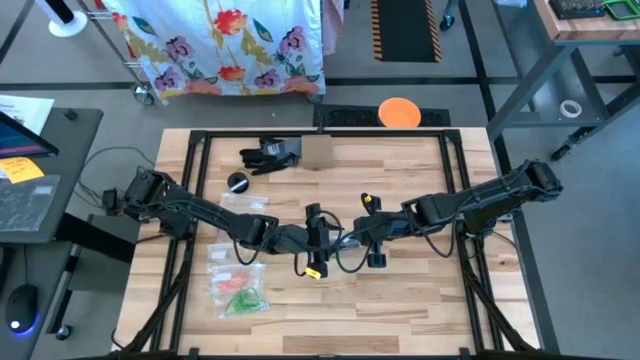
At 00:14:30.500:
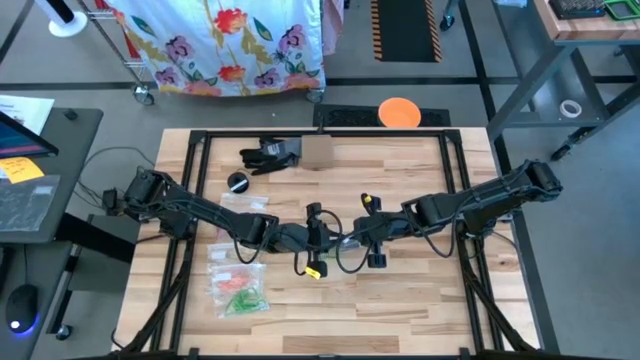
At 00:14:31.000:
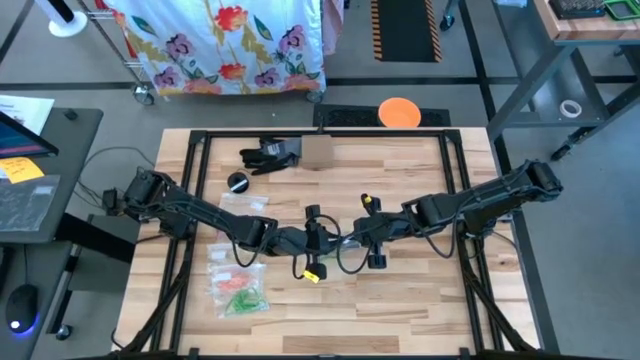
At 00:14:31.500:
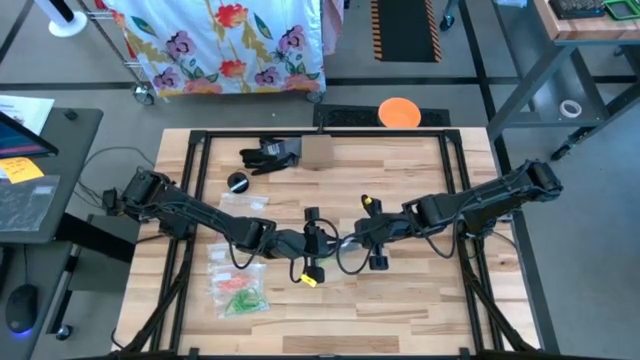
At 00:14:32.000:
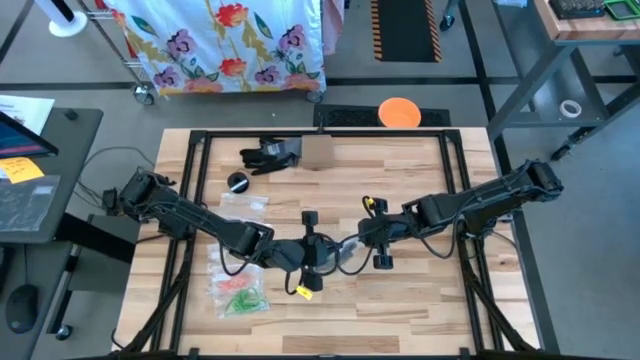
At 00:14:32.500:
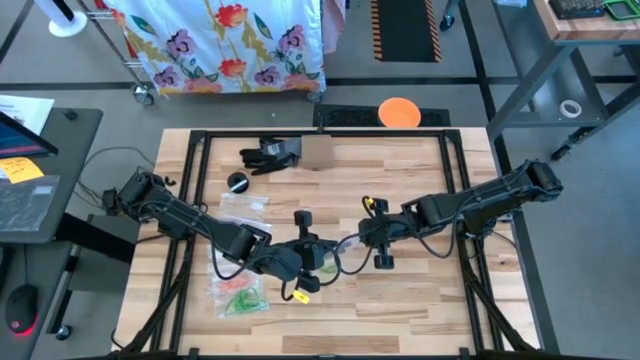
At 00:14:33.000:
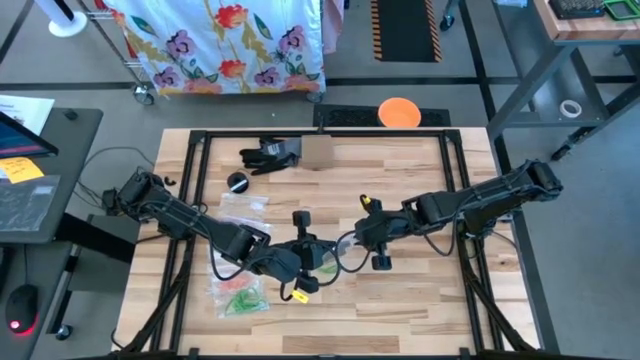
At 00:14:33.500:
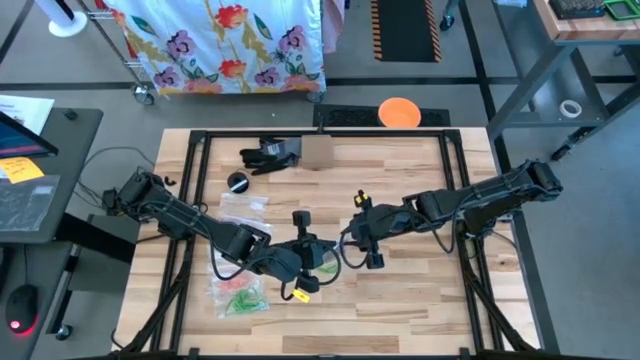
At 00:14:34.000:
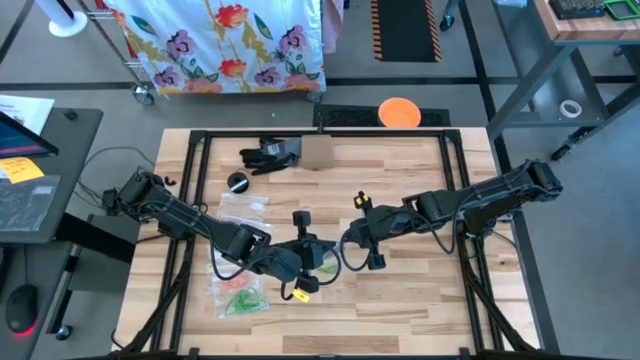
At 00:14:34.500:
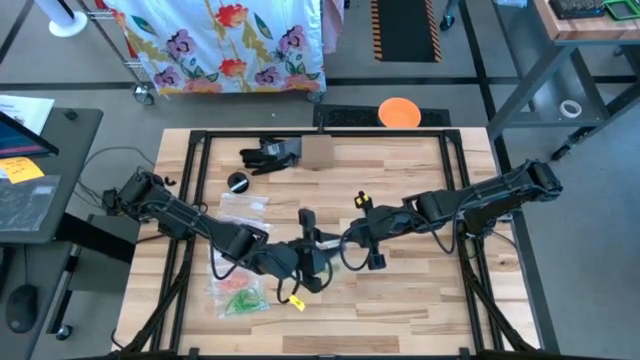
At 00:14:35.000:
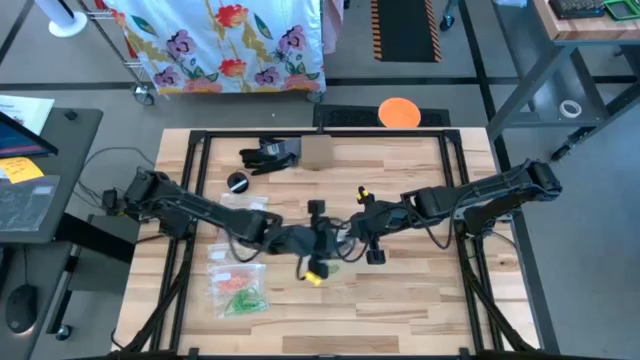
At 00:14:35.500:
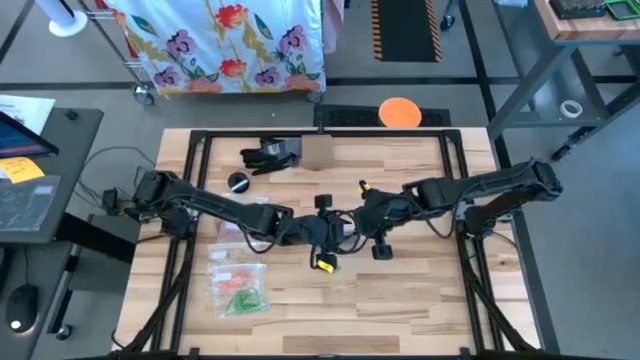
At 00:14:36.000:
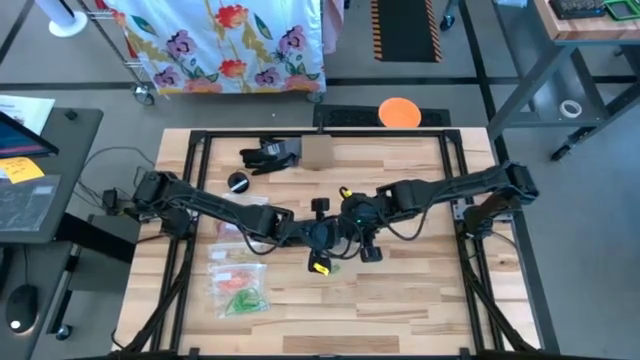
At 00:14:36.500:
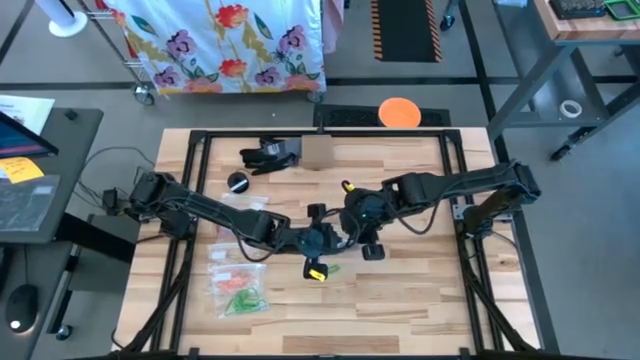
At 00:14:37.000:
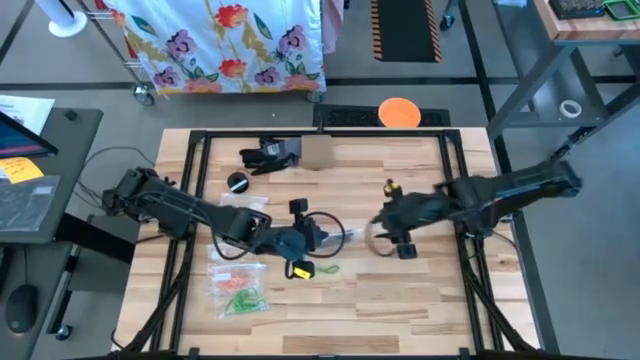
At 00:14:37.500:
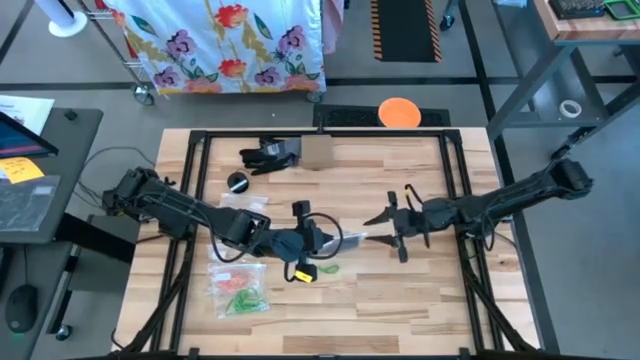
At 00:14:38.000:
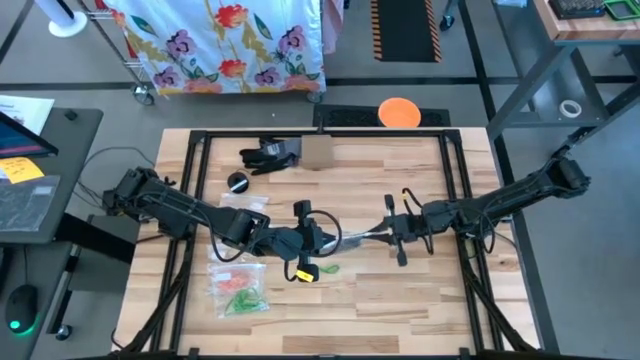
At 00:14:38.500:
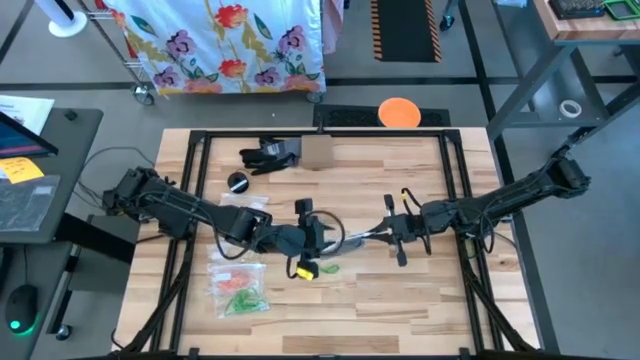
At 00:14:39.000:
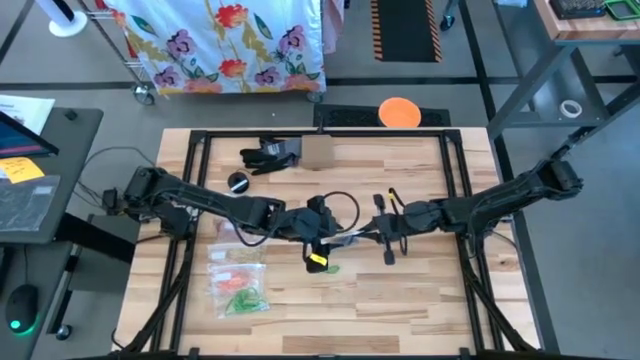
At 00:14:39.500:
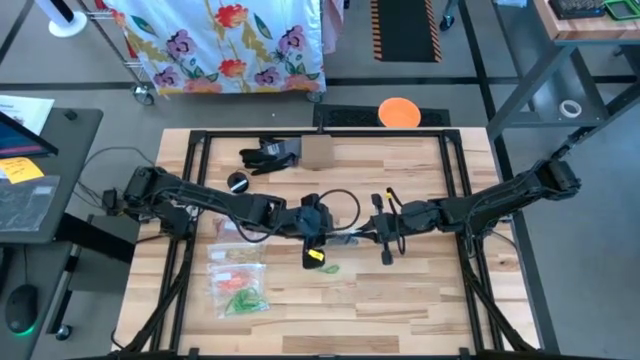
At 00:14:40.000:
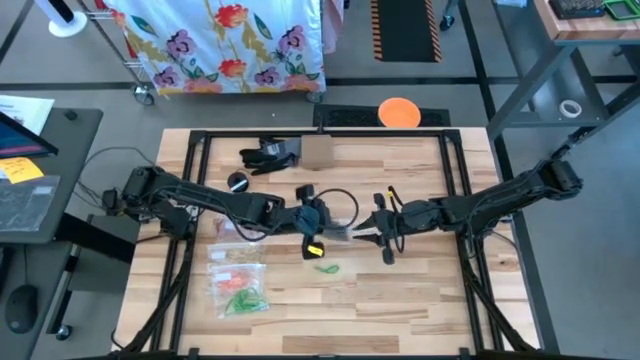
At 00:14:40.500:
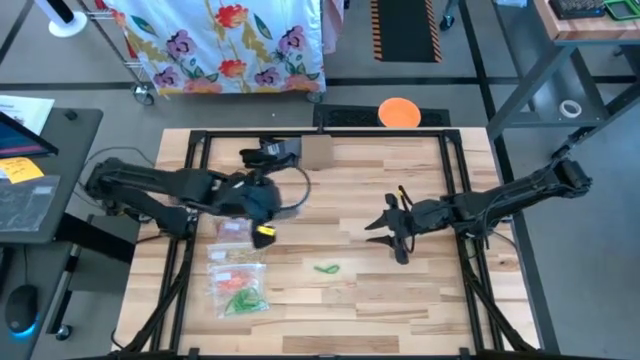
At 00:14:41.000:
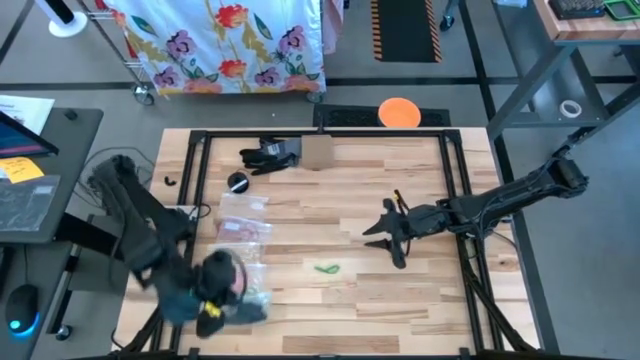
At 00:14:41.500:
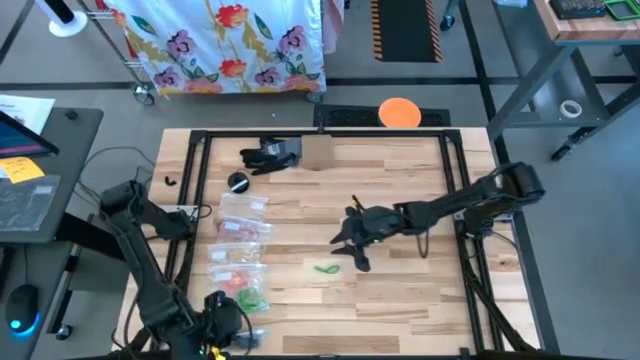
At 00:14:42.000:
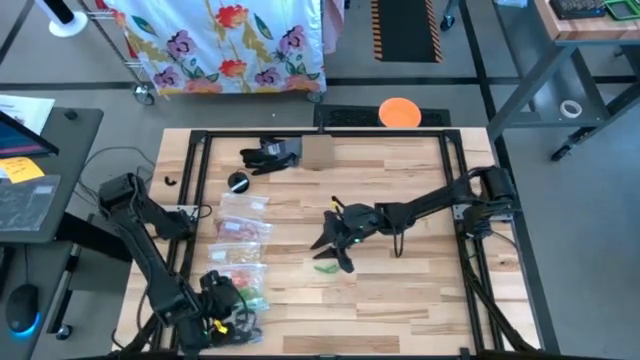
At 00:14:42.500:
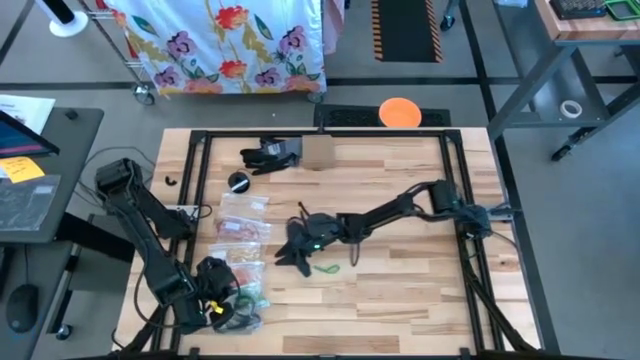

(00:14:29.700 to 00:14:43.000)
Task: Sort rubber bands
Close the transparent zip bag

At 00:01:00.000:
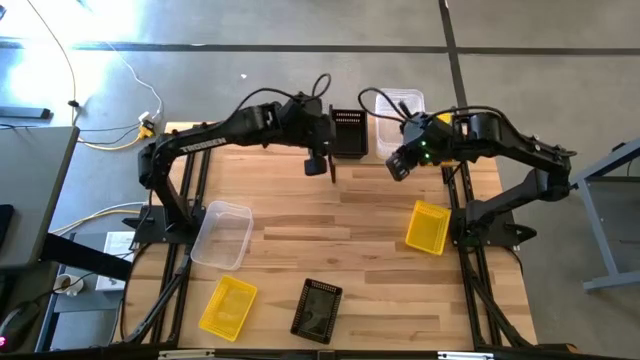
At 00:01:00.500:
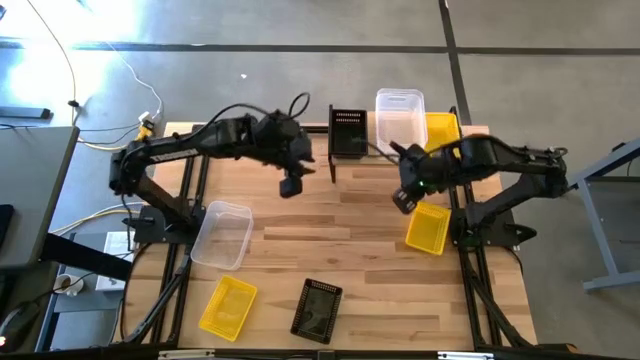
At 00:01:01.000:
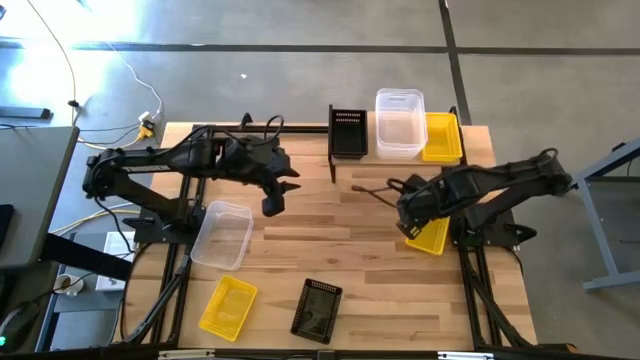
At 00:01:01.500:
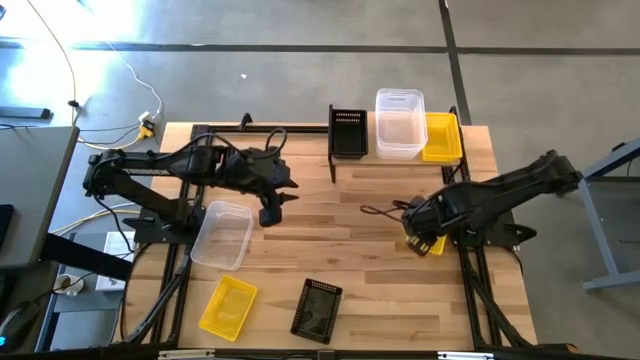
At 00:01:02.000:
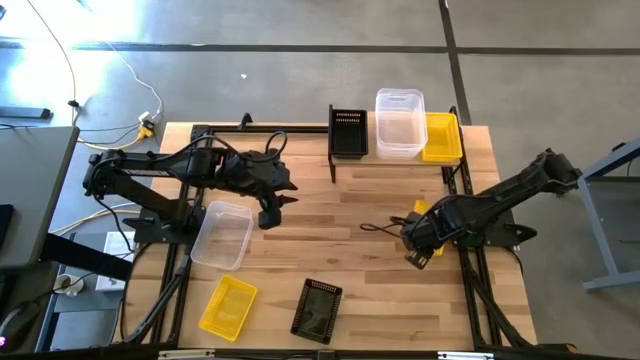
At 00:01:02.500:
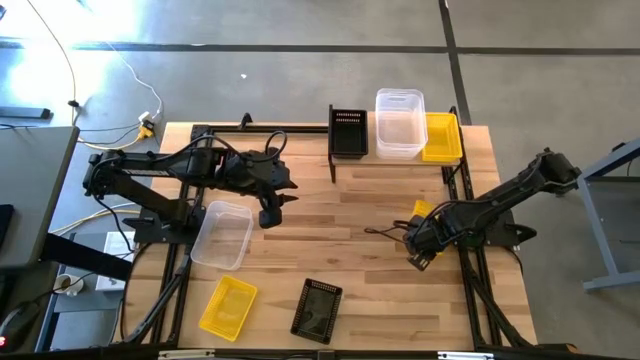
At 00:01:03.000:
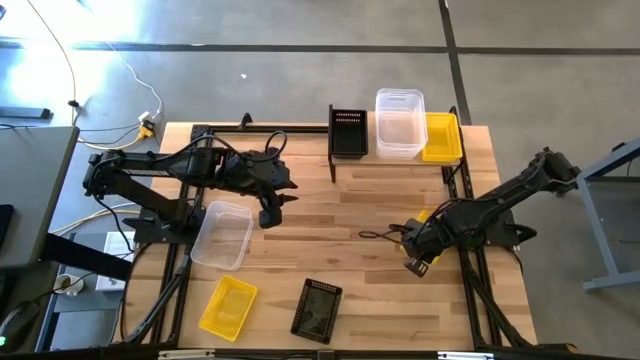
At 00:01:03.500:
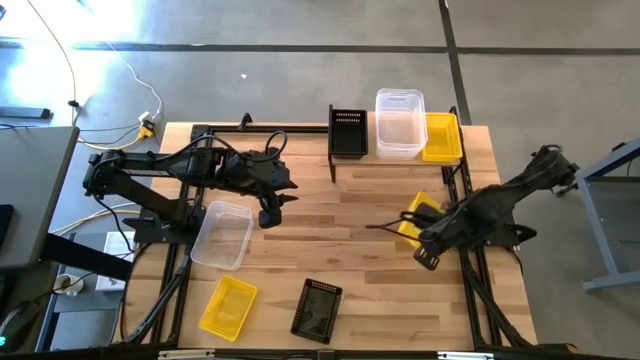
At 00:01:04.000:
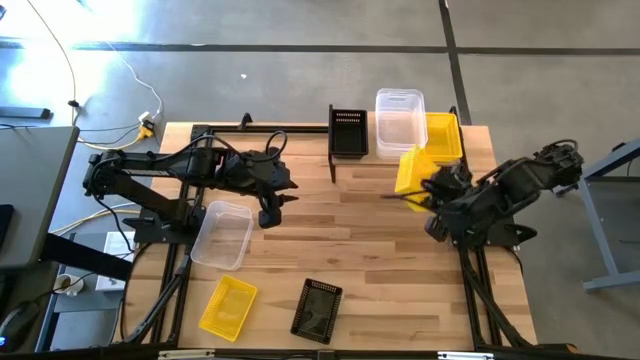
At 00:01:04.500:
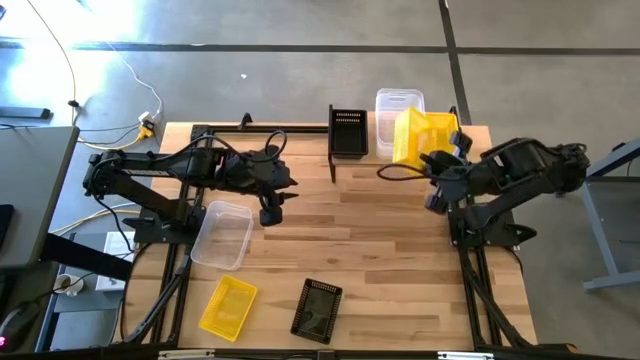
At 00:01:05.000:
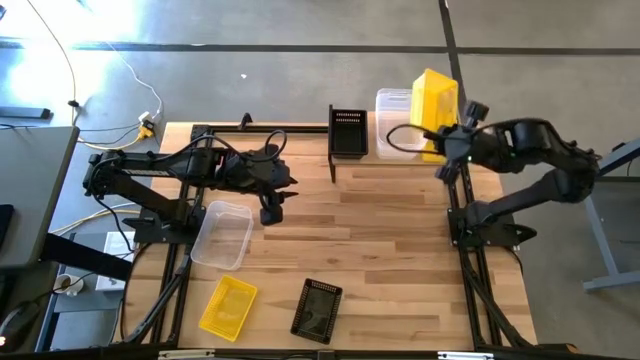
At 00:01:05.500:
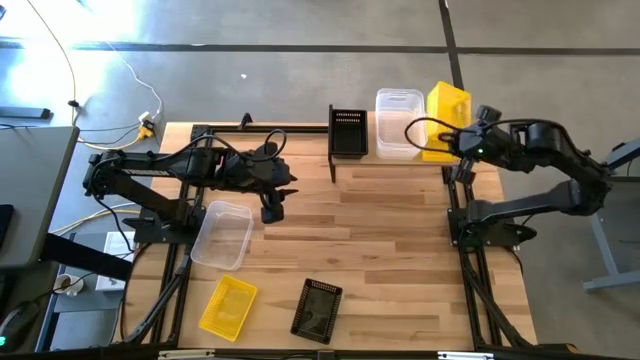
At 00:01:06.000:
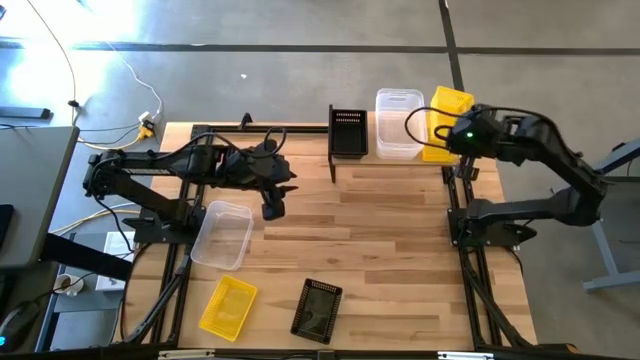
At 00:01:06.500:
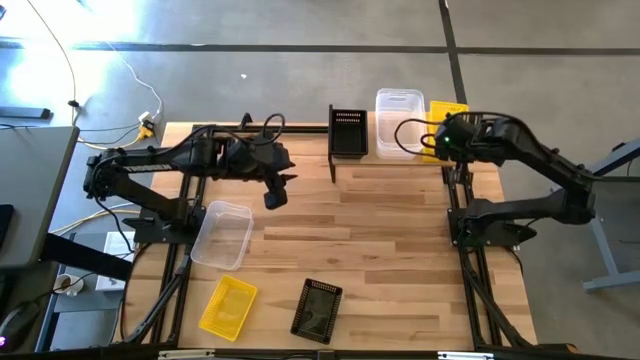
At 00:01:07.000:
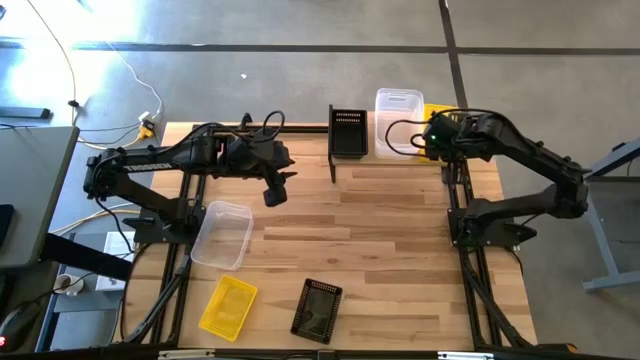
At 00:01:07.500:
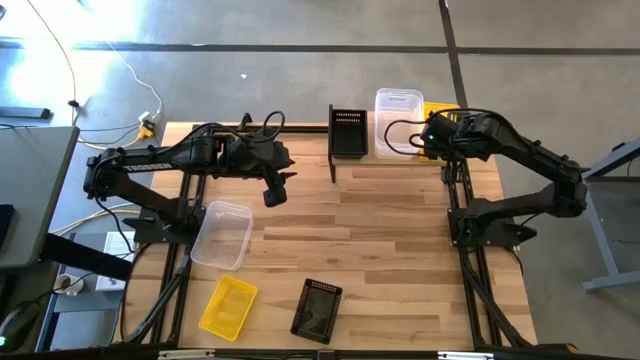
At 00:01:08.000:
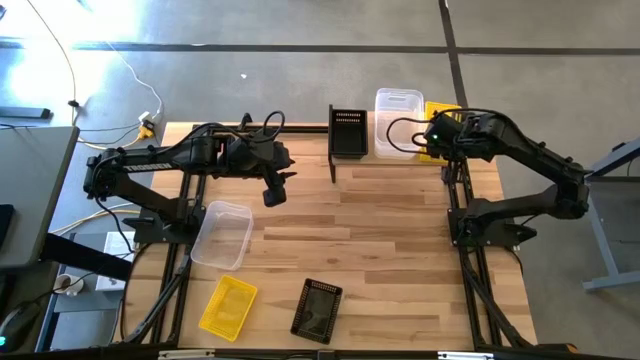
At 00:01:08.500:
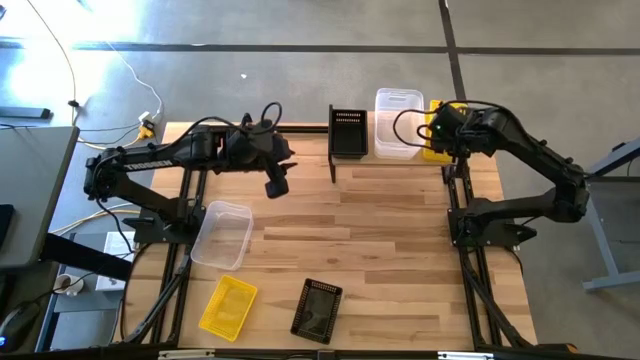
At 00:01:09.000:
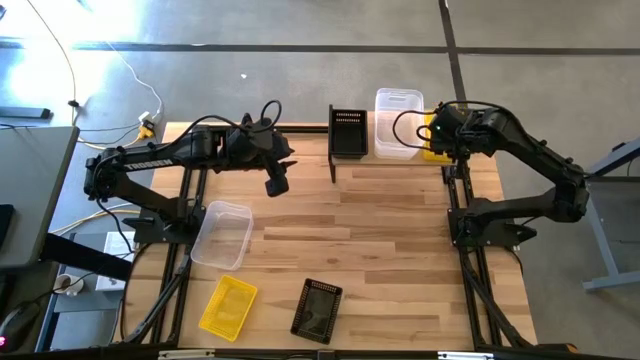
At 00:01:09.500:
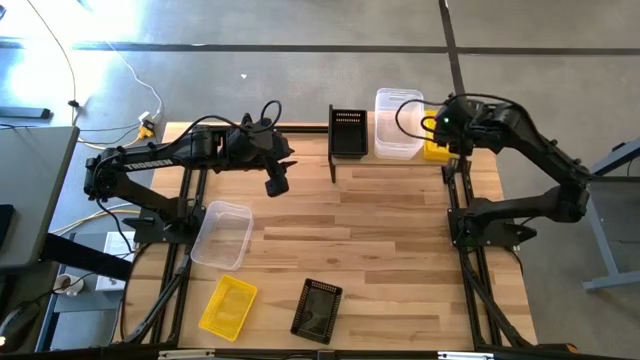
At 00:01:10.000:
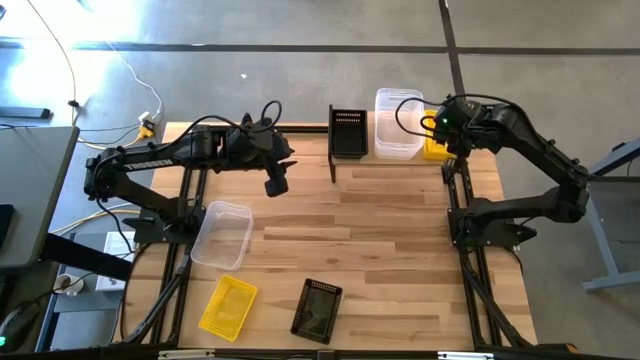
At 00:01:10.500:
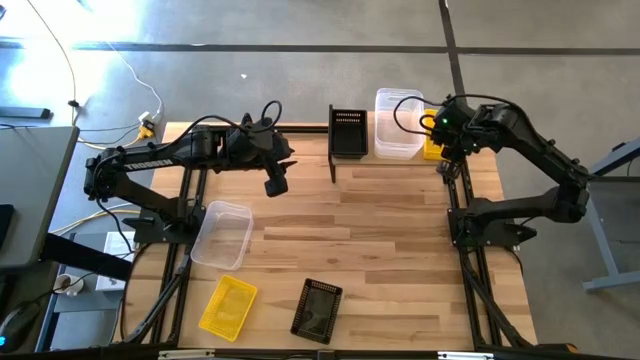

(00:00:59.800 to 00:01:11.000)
Task: Stack baskets on shelf by color
Stack the right yellow bin on top of the yellow bin on the shelf
